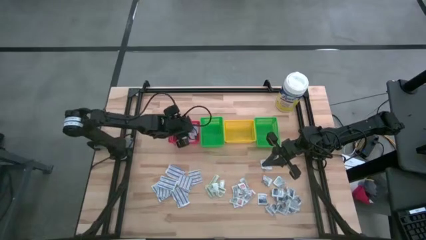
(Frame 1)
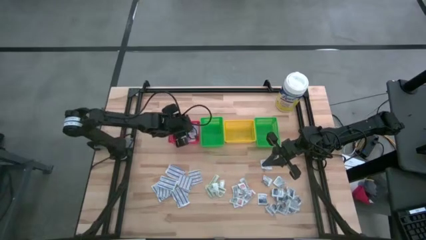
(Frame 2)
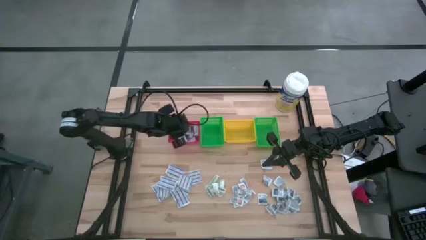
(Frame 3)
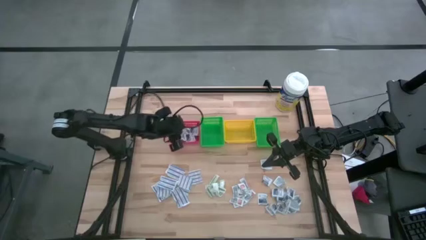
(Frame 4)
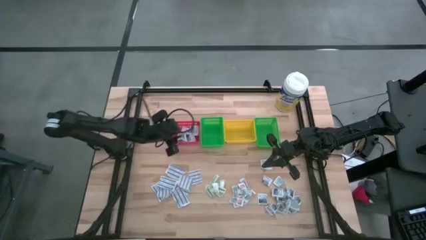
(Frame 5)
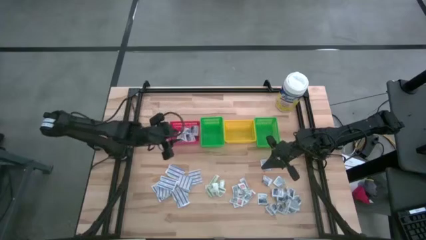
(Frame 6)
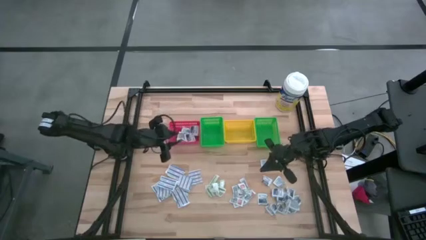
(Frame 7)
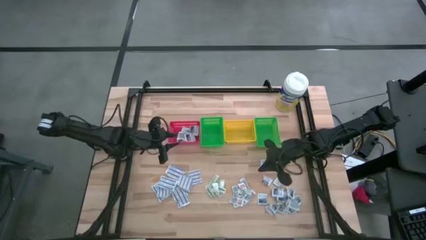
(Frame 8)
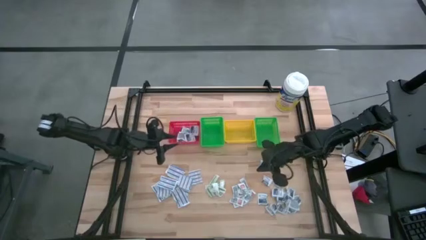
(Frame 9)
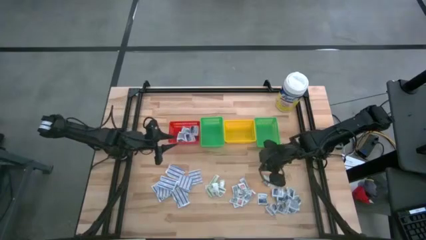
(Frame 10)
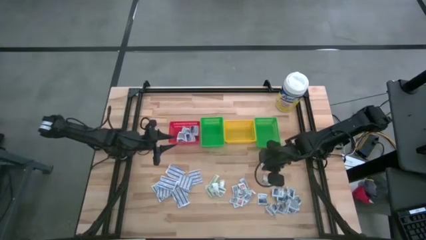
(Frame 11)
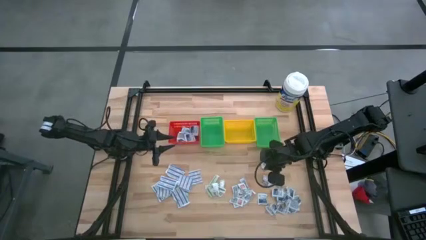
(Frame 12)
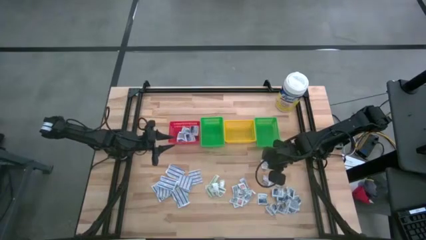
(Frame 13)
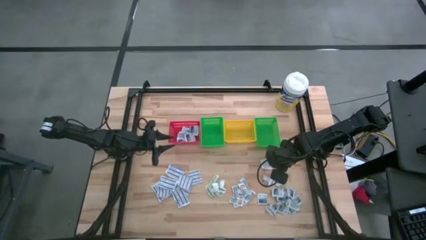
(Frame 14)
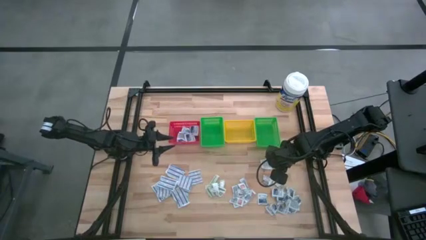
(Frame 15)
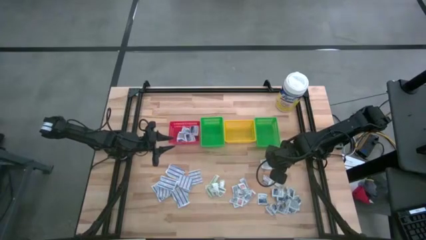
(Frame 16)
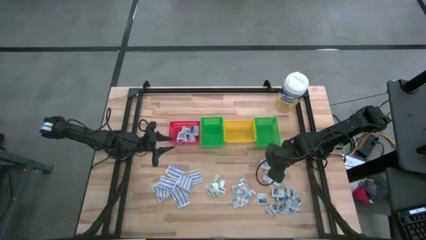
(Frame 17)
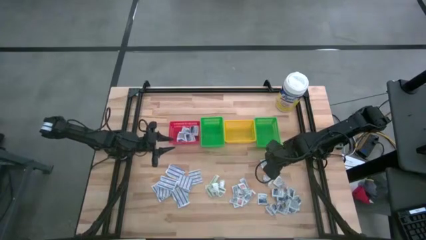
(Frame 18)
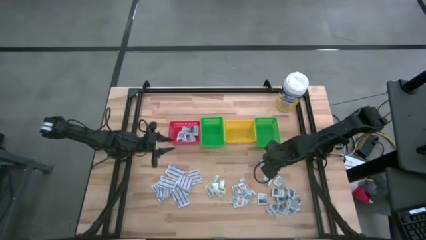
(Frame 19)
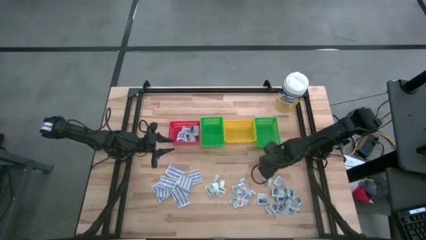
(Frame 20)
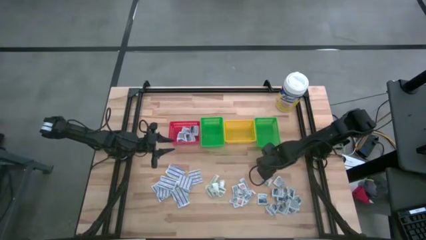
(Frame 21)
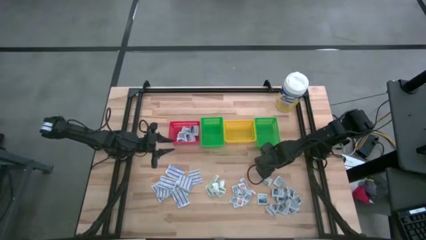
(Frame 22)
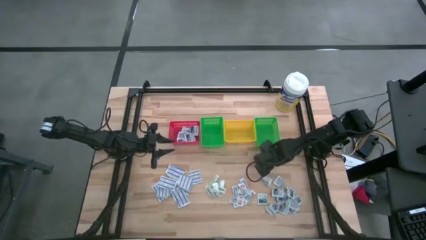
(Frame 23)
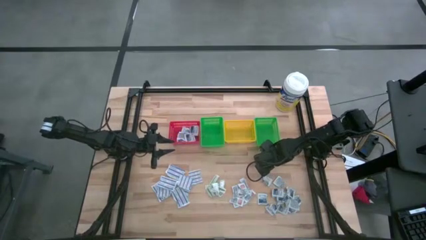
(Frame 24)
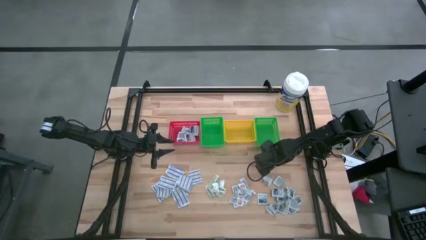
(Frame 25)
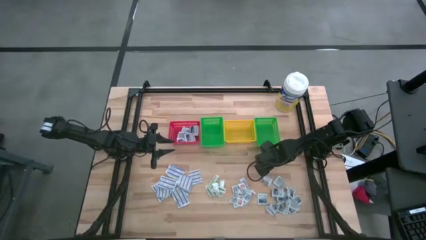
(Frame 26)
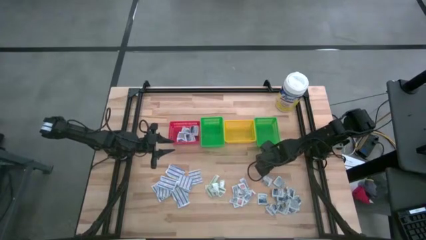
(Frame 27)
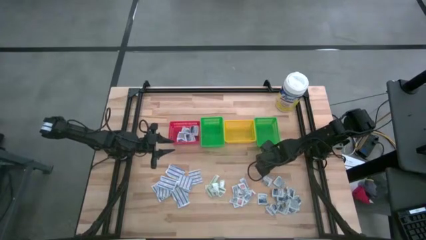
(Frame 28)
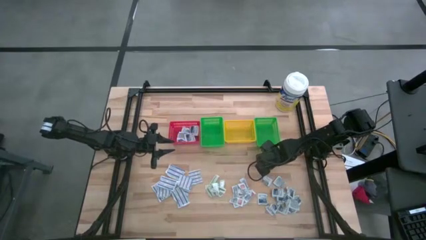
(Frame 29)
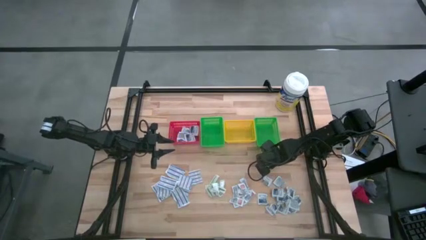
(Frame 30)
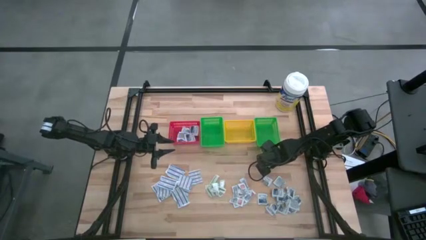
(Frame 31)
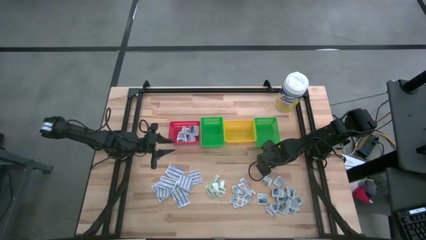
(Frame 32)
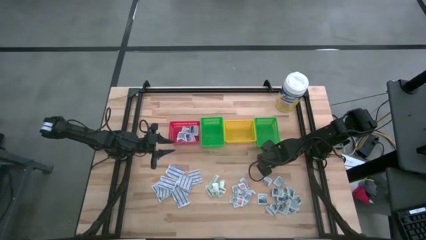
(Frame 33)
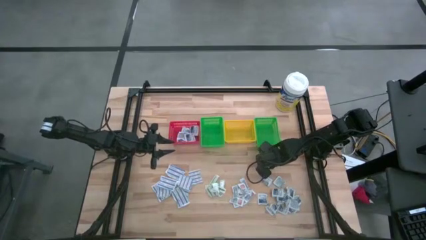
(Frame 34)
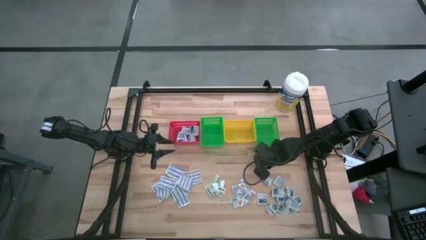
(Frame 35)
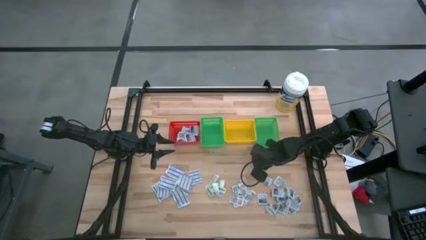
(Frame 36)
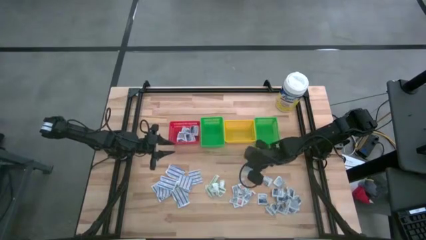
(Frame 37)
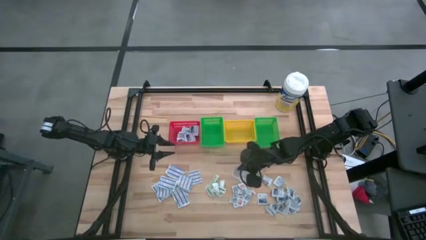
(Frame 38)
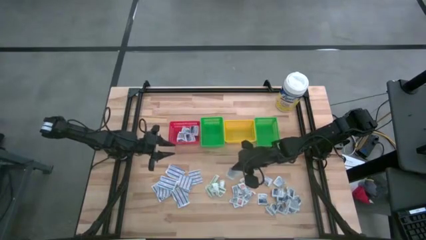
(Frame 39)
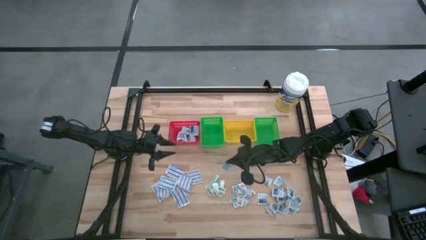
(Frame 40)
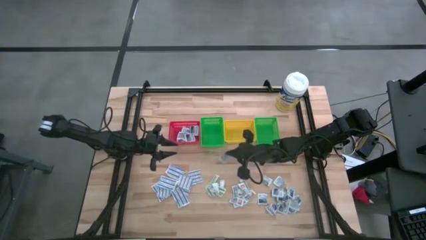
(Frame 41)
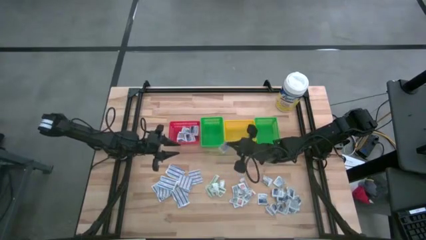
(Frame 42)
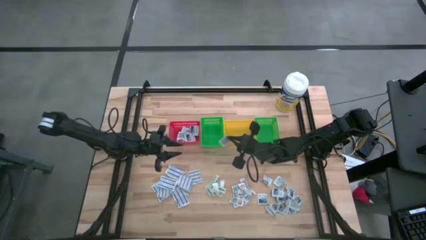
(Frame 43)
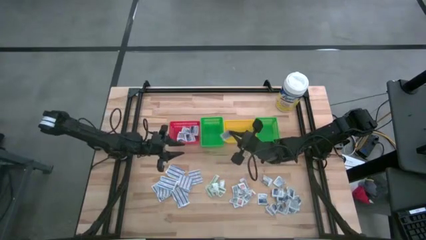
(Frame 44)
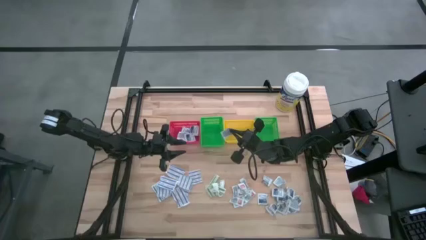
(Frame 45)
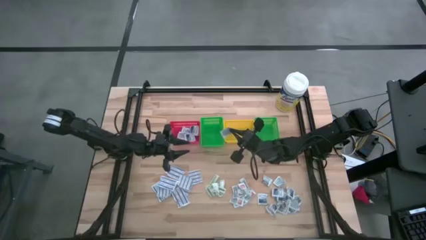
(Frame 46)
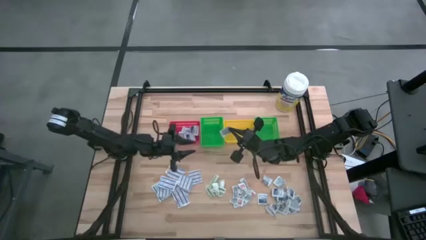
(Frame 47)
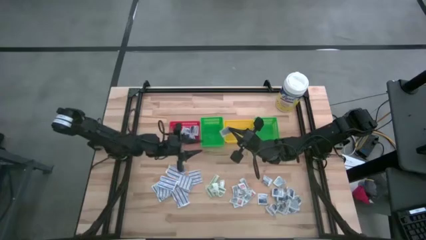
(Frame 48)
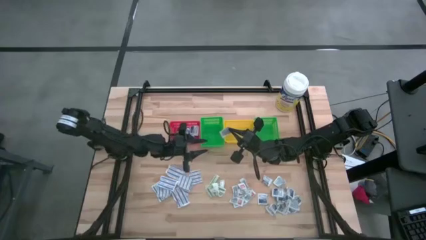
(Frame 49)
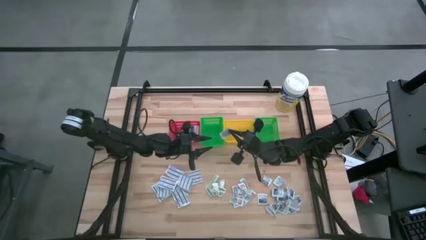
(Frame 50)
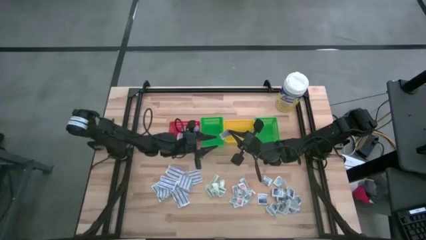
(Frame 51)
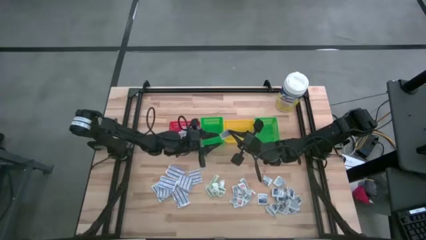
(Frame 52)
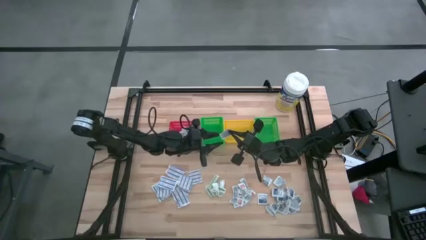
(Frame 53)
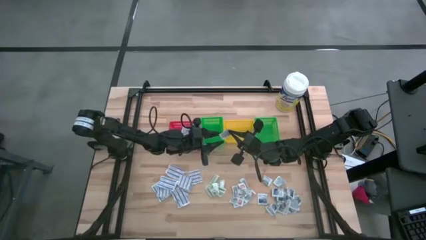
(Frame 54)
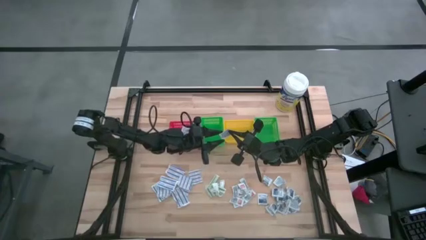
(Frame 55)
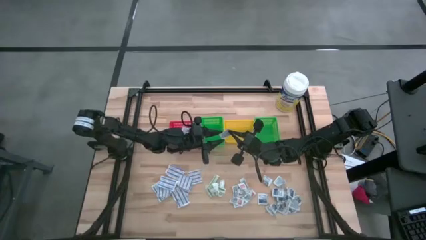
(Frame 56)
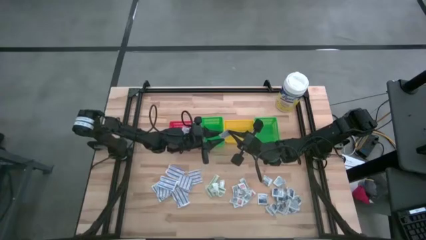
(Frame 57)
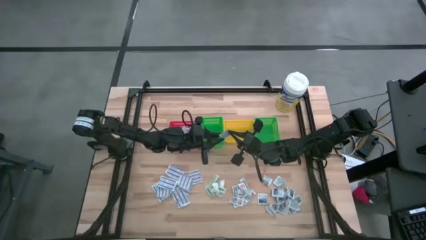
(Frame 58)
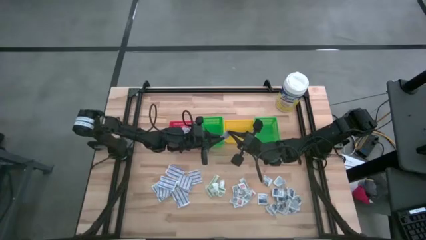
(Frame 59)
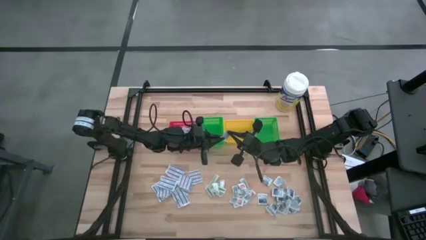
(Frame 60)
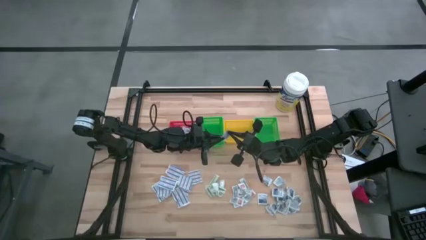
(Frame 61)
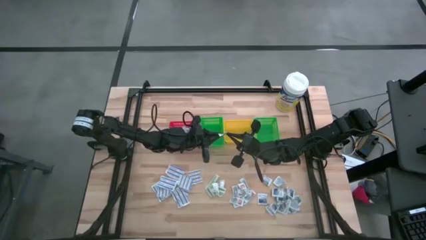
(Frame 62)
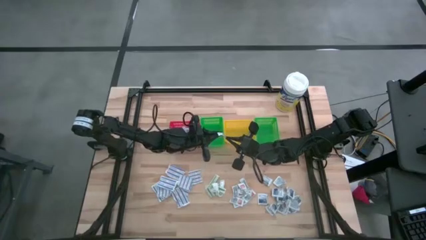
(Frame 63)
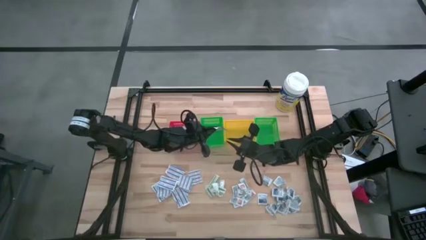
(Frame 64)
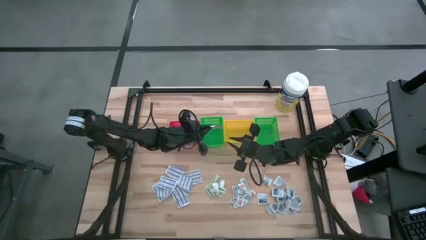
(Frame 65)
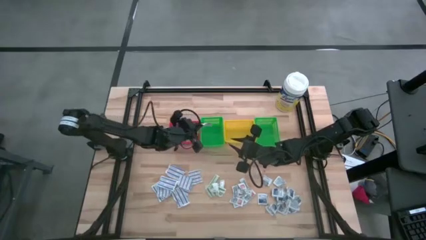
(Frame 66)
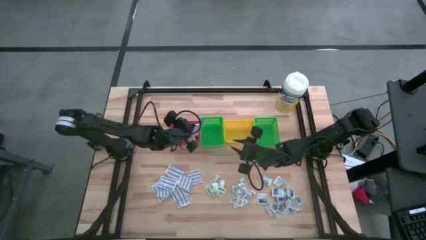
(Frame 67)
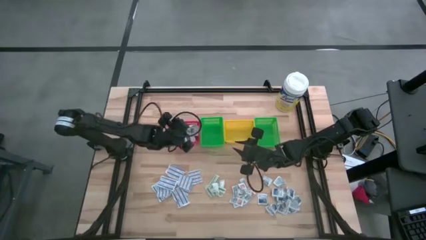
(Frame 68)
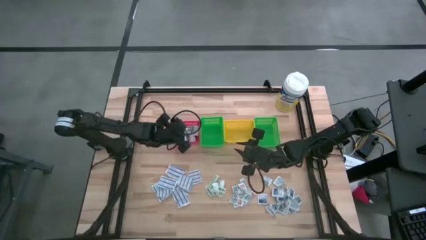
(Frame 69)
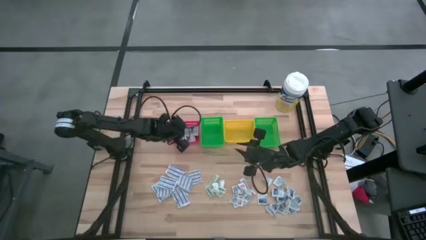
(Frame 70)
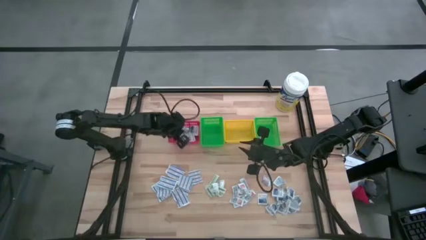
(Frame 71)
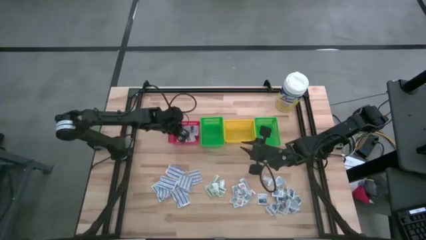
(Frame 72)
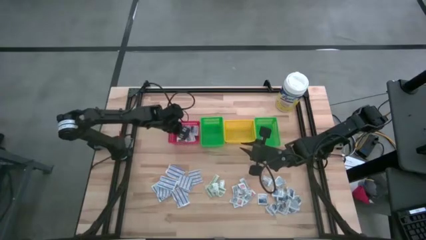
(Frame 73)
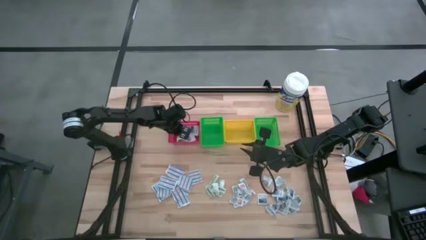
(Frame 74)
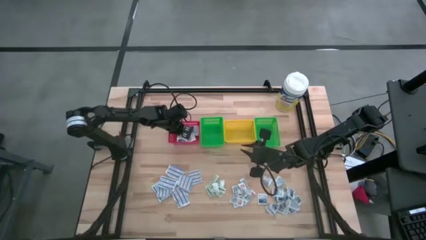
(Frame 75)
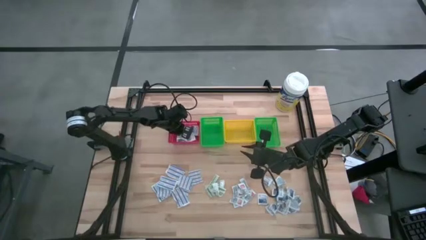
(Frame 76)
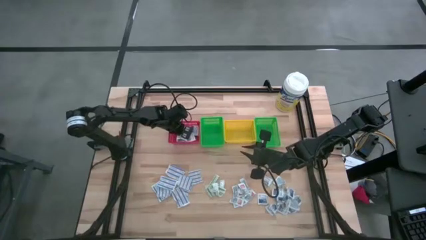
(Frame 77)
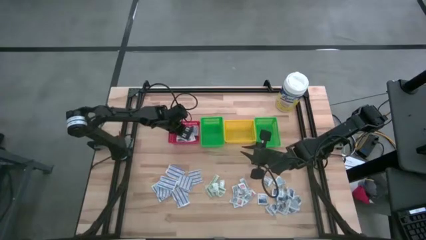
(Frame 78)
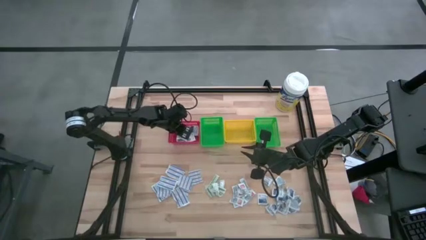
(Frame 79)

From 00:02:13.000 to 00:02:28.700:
Task: Pick & Place First Aid Supplies
Put the alcohol pad into the red basket
